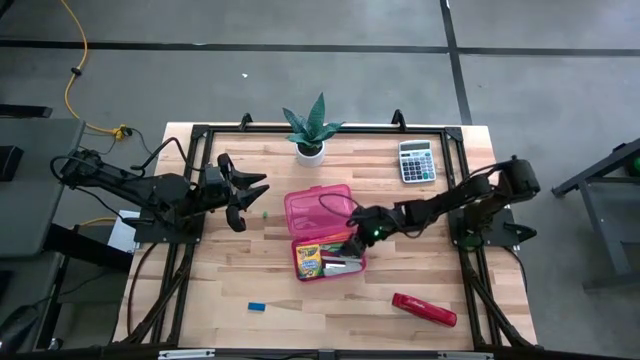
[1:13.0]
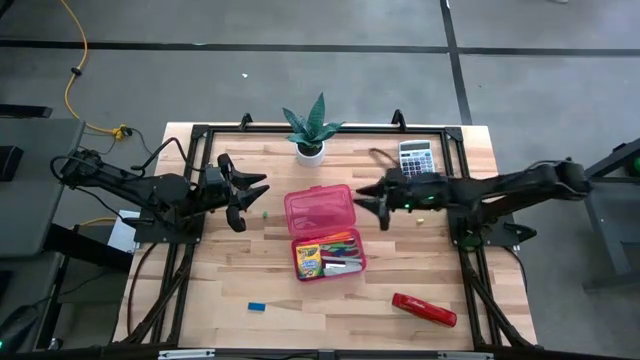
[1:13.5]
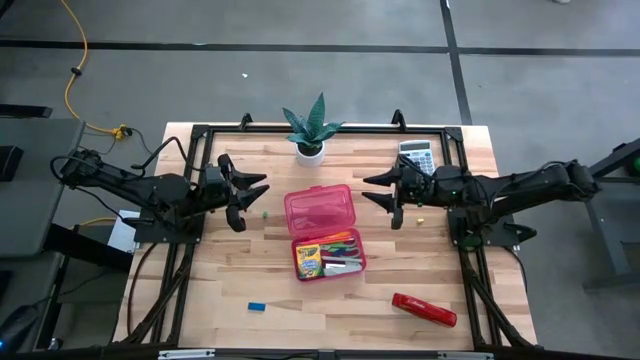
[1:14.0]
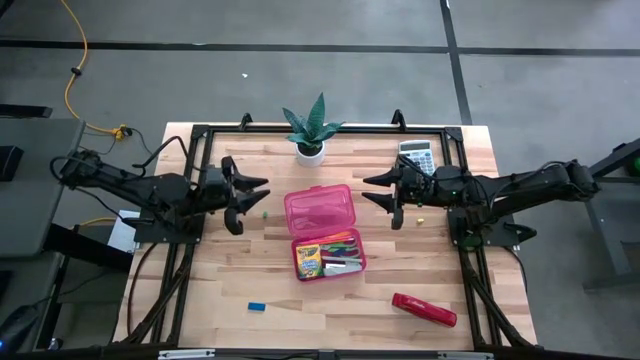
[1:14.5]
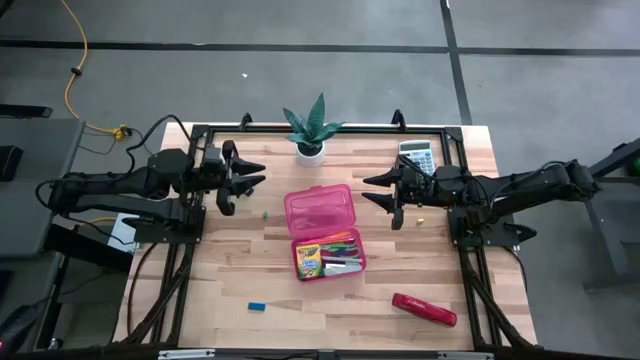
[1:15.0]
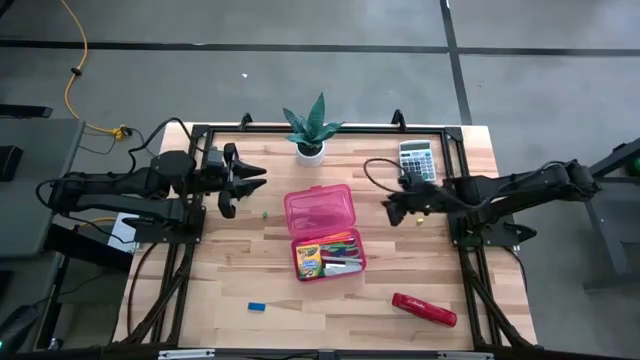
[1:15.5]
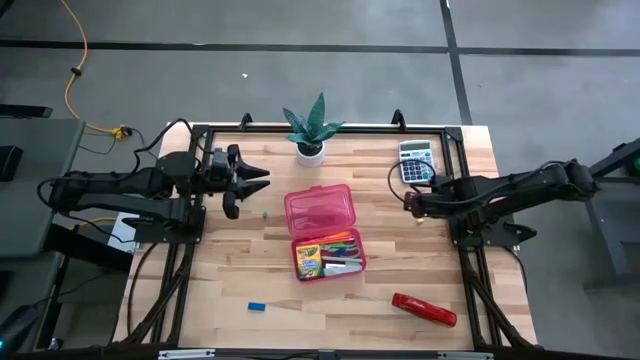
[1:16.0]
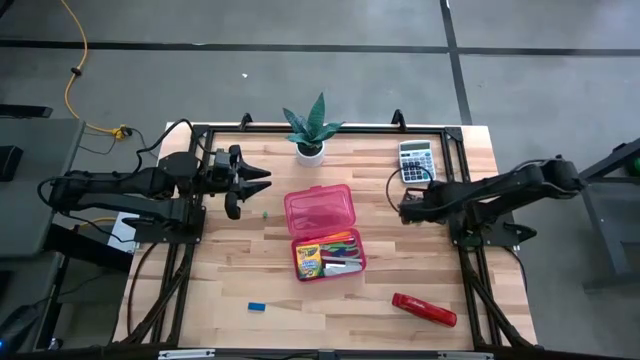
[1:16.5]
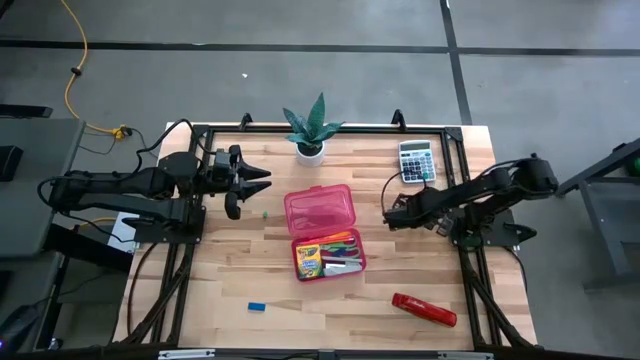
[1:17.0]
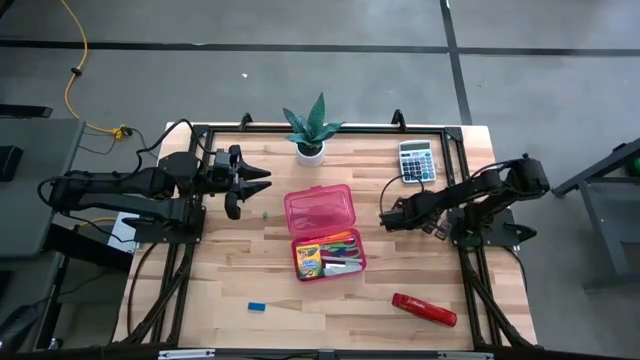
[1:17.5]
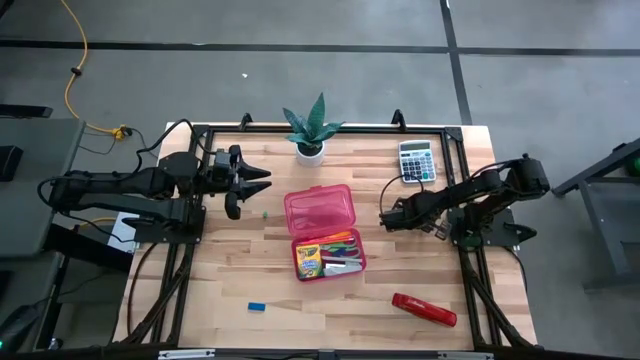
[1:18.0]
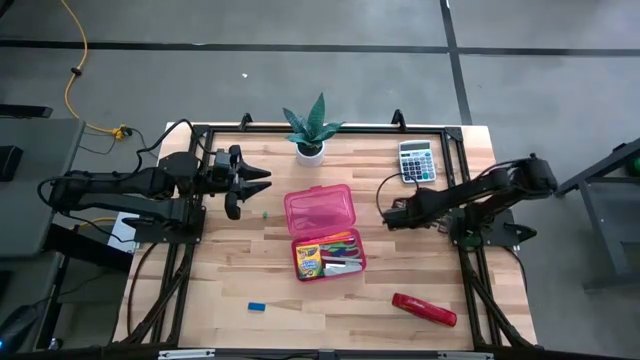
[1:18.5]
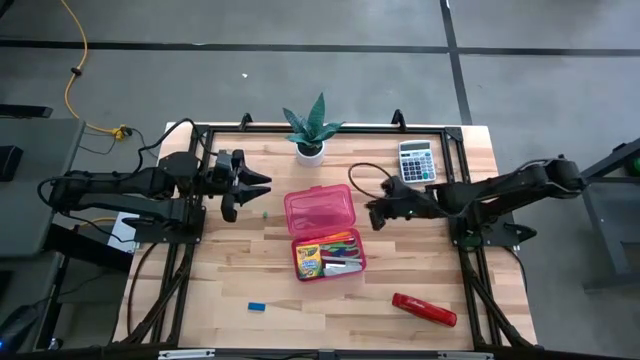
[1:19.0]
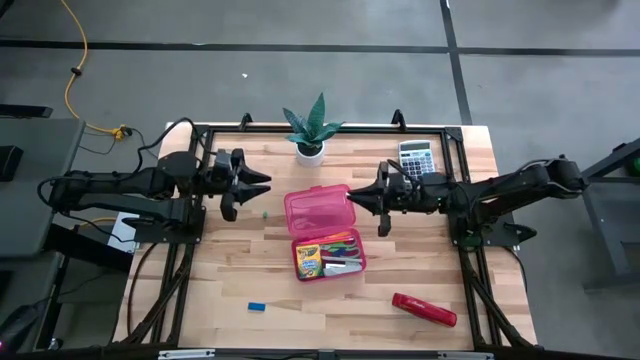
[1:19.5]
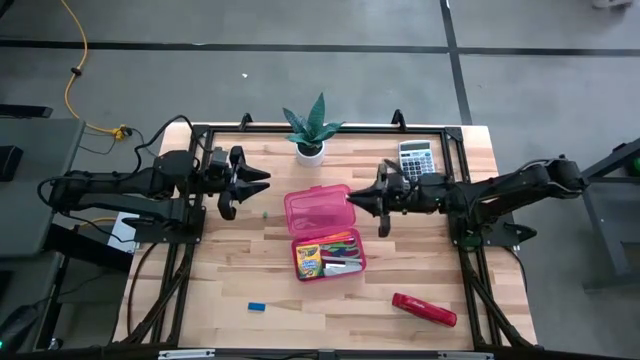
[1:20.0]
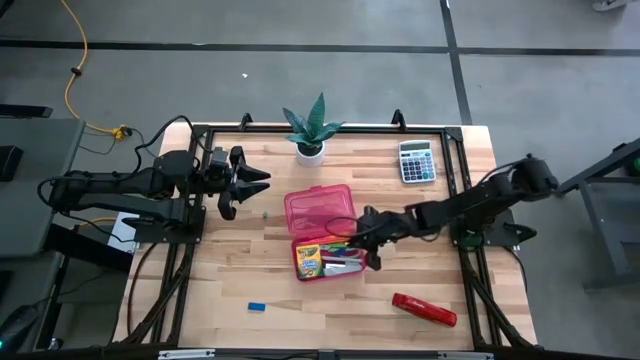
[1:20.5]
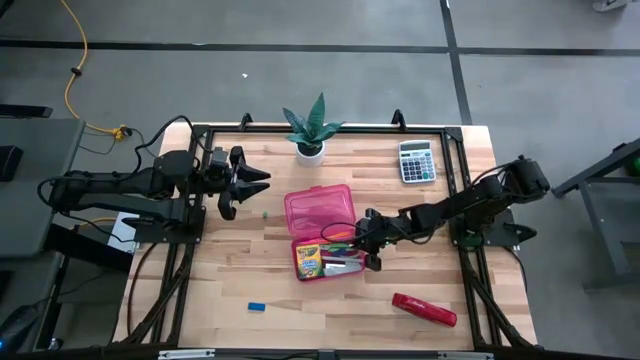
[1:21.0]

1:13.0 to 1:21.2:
Task: Pack school essentials
Put the yellow pencil top eraser into the red supply box

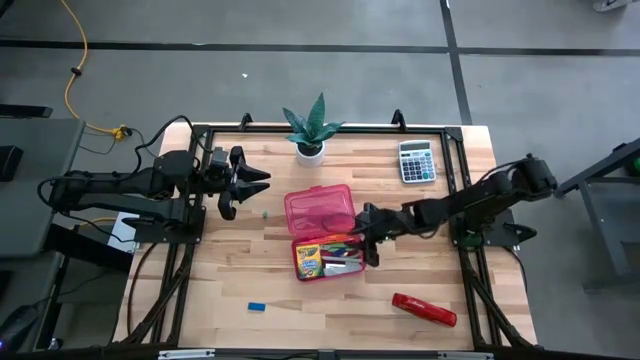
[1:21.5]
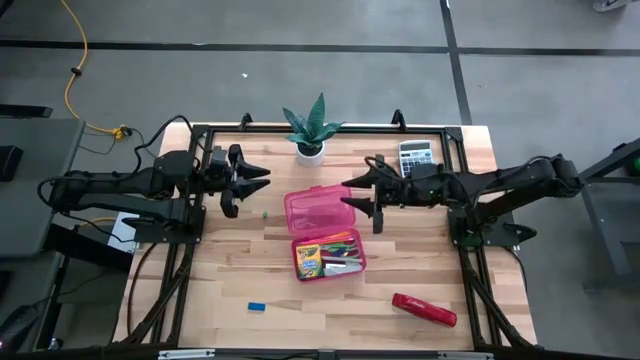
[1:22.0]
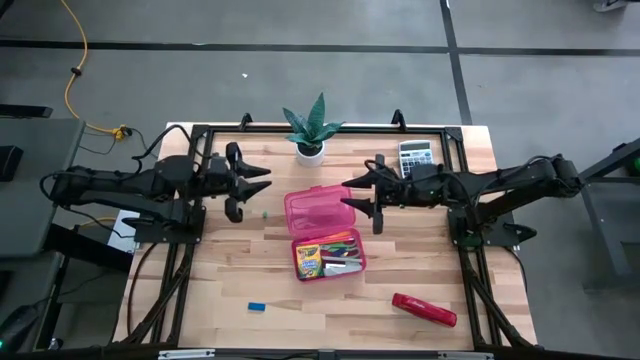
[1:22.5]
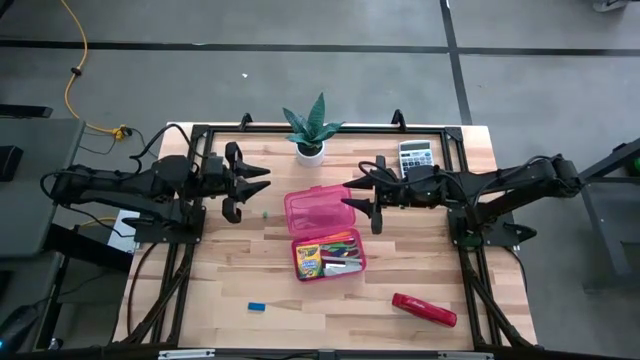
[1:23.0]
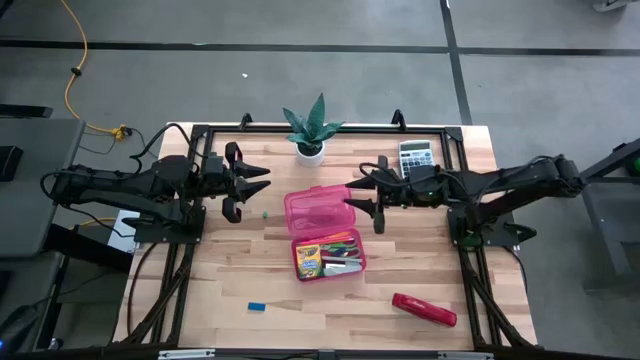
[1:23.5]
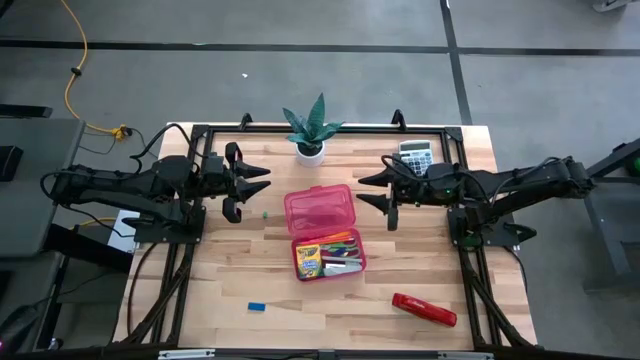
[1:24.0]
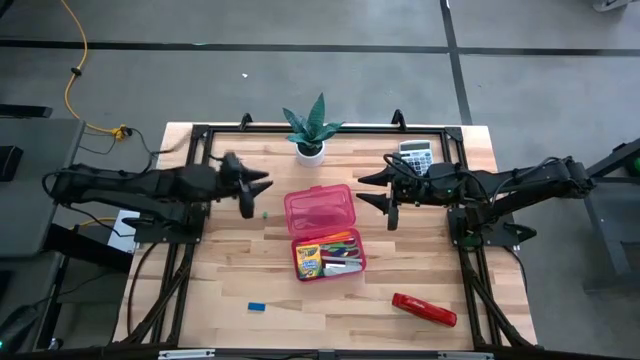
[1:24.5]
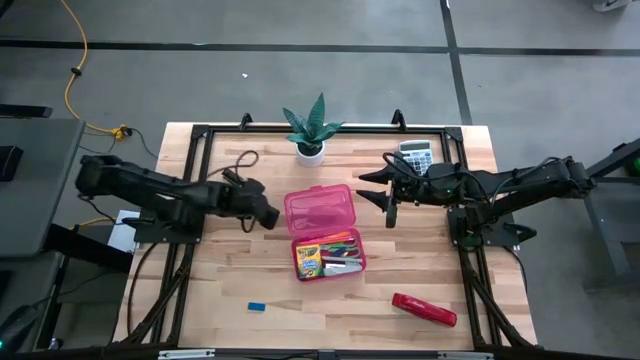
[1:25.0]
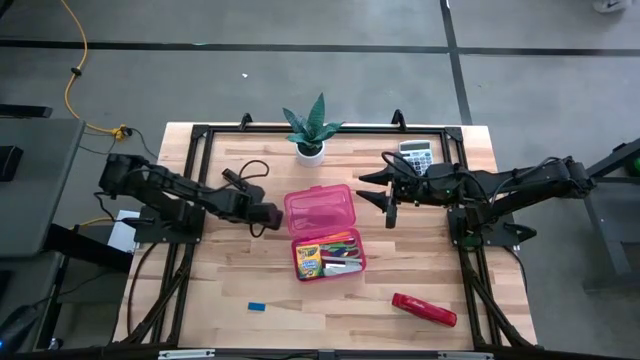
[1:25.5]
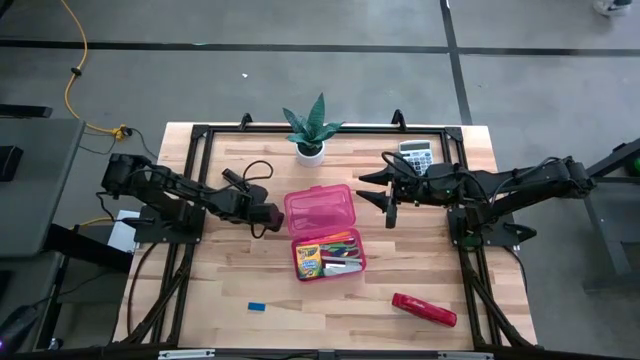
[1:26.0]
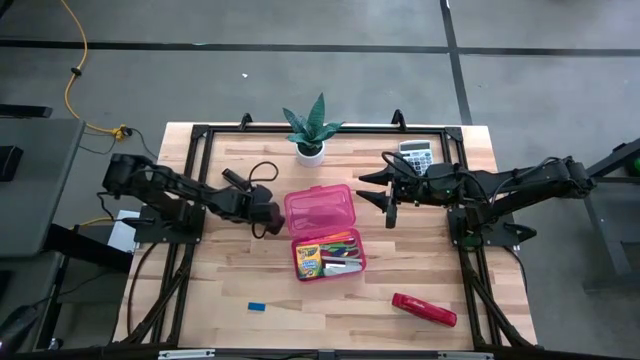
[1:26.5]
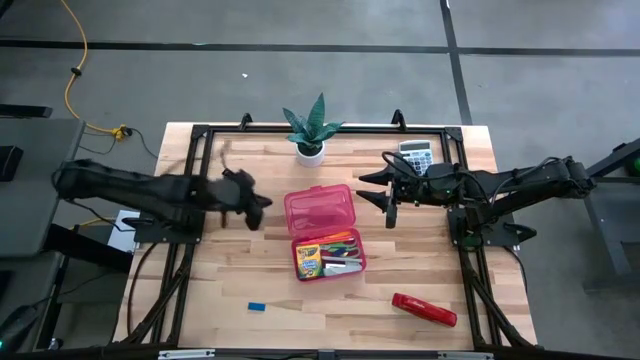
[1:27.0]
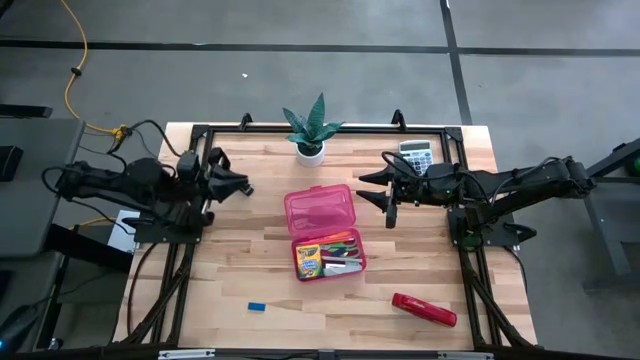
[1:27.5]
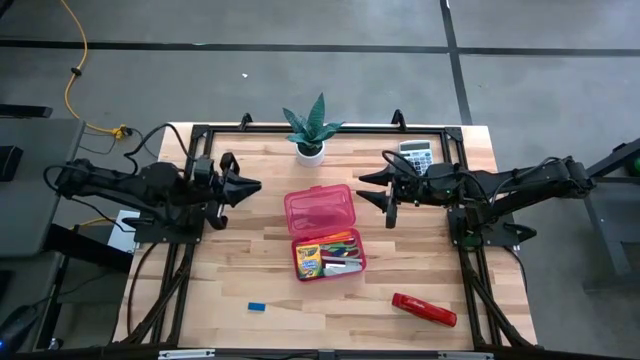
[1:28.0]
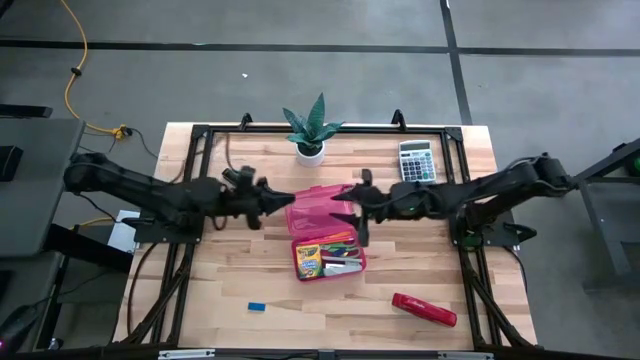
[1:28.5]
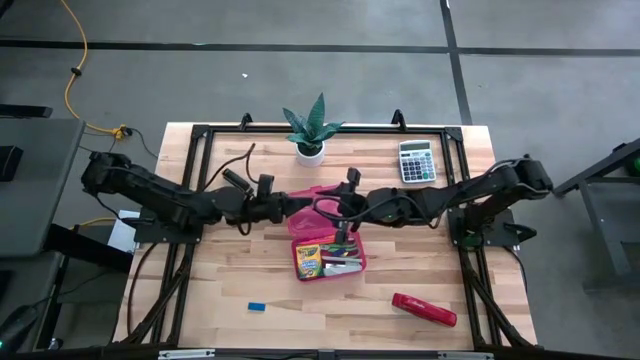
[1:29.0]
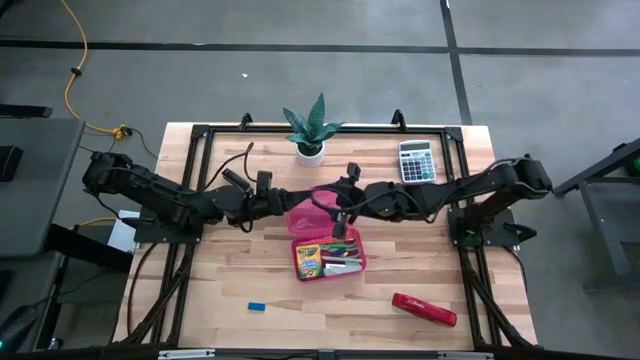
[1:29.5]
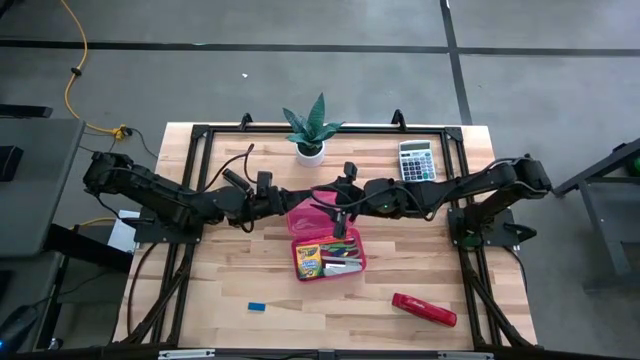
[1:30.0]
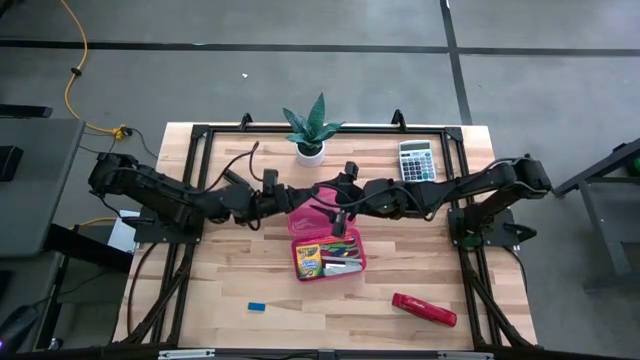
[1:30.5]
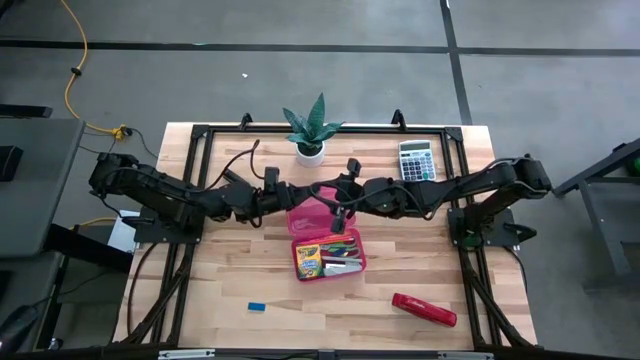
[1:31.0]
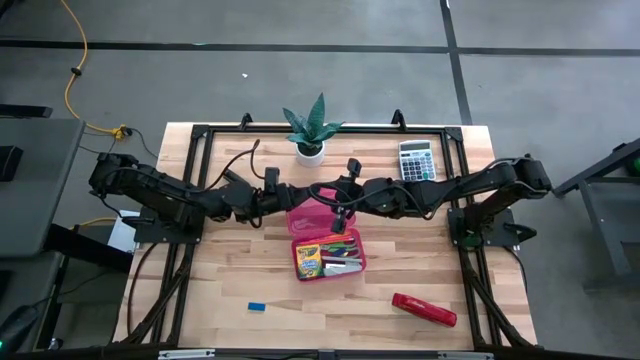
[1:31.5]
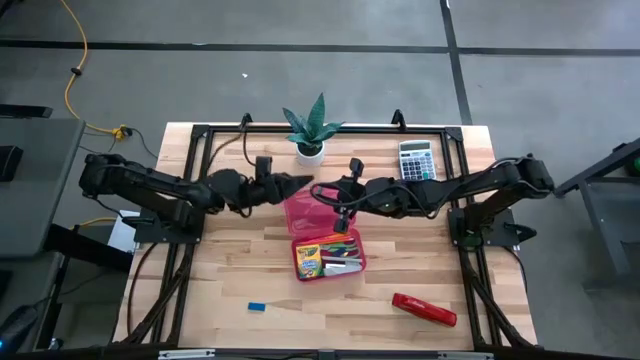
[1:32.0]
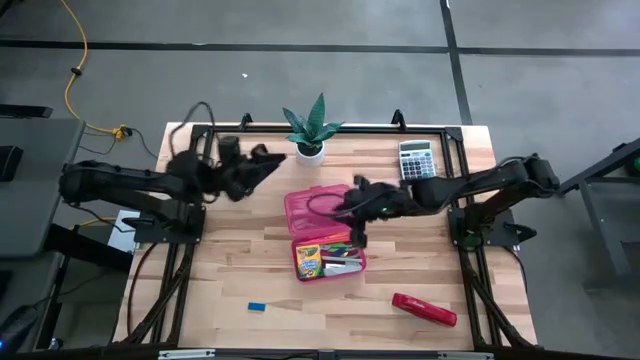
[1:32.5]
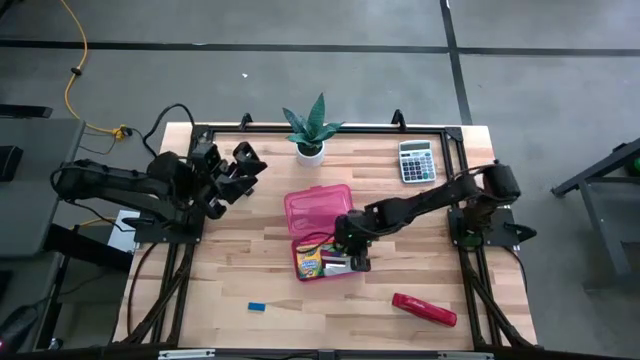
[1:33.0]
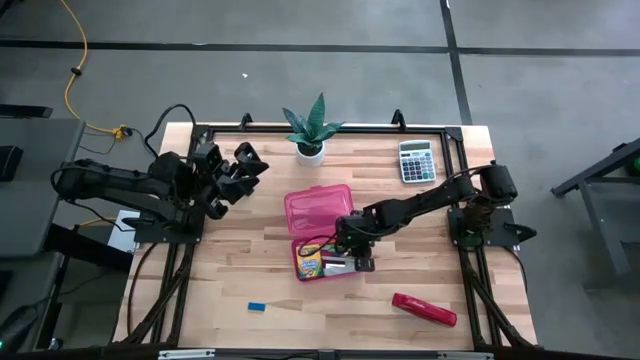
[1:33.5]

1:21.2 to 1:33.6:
Put the green pencil top eraser into the red supply box
